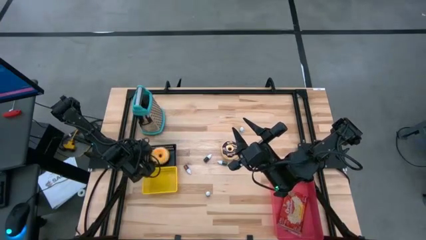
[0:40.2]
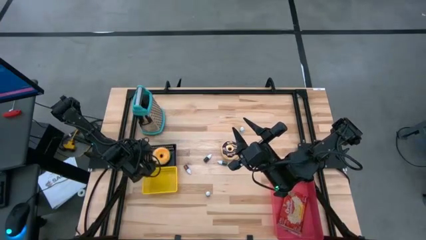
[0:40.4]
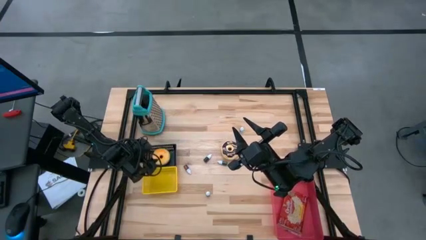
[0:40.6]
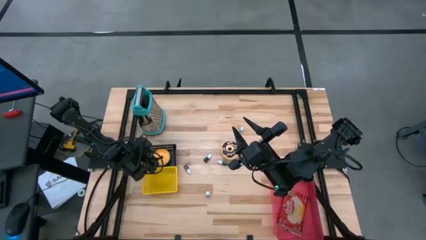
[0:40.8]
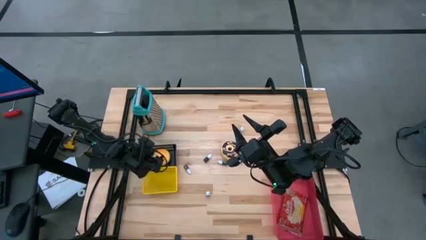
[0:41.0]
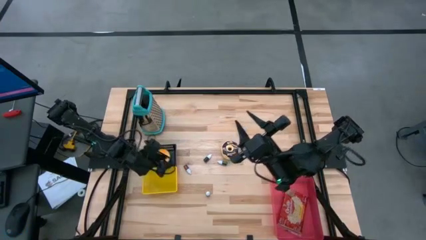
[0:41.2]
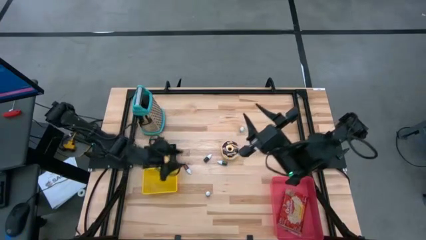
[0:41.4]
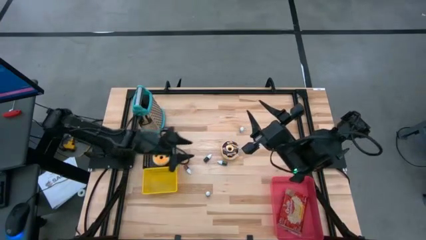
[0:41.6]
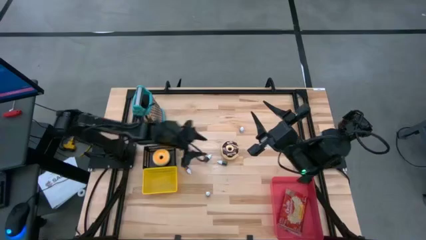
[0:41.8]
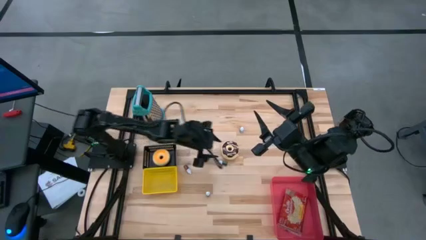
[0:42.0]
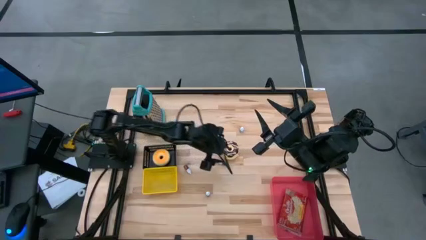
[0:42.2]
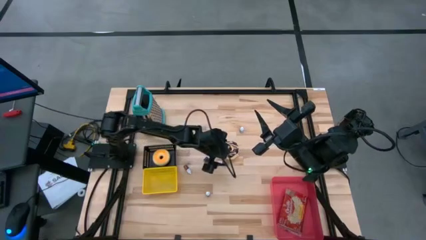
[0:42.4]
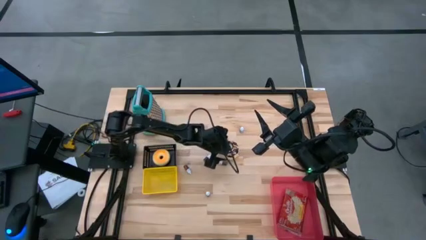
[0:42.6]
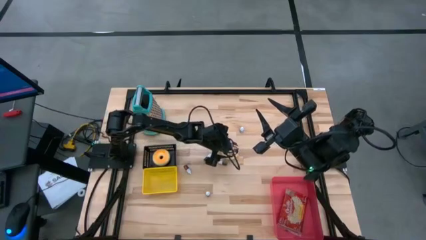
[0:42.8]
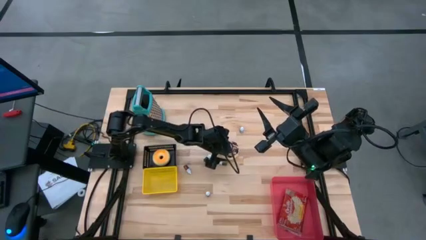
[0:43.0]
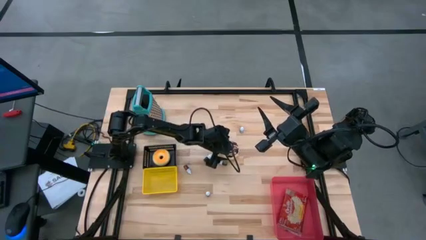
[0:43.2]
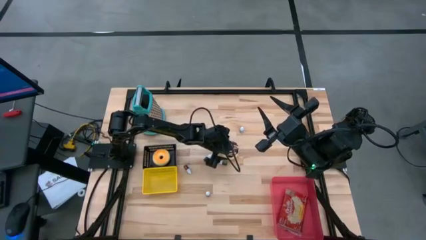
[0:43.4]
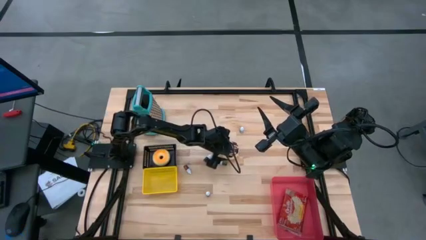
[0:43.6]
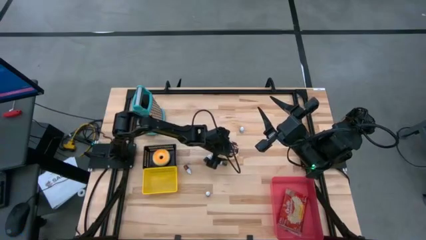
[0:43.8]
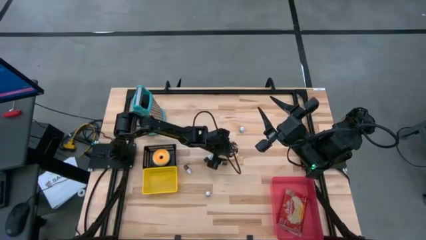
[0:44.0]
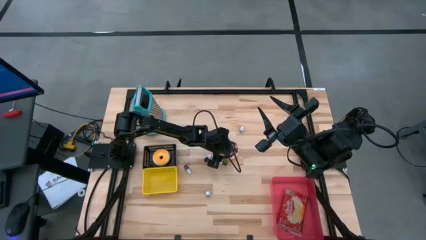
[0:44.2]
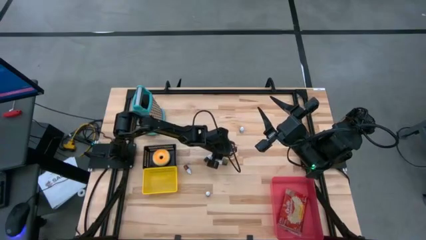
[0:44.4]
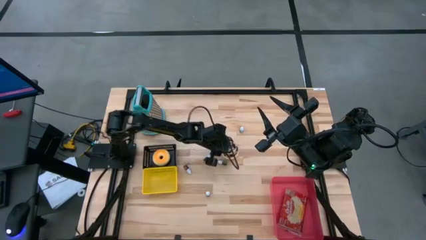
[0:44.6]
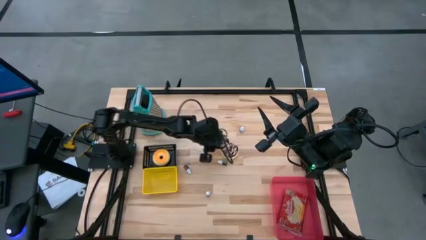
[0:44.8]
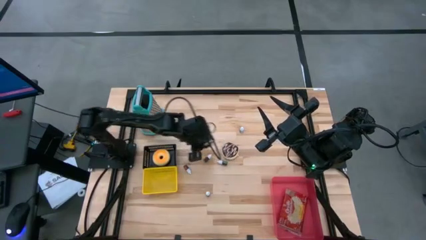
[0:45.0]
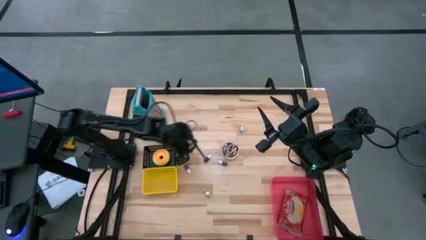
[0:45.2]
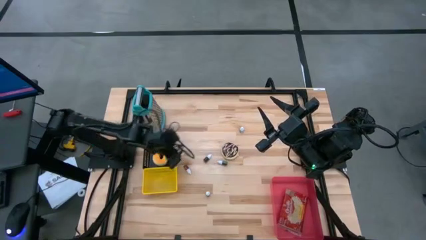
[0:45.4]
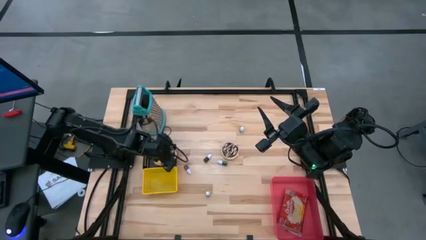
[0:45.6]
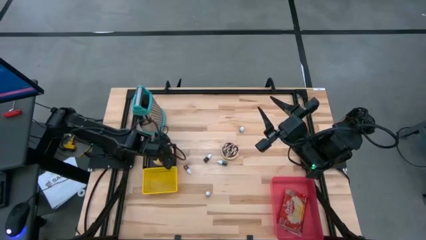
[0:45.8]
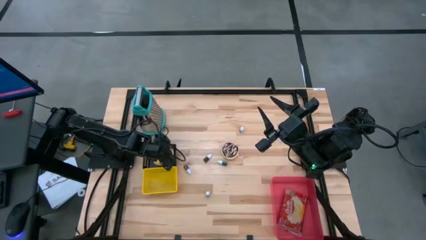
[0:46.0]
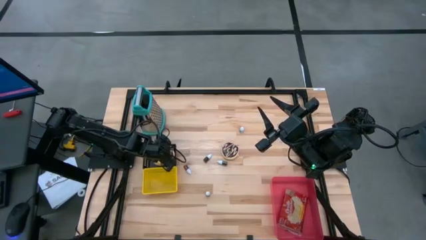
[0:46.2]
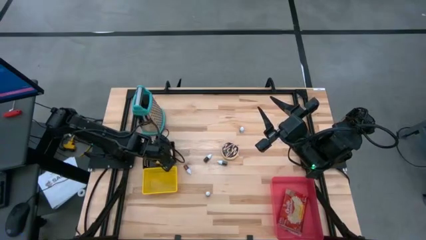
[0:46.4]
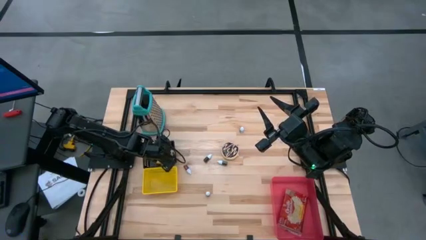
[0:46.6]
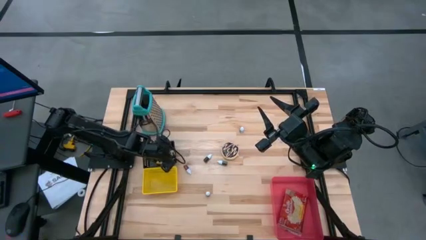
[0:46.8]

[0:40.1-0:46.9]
Put the black donut into the black bin

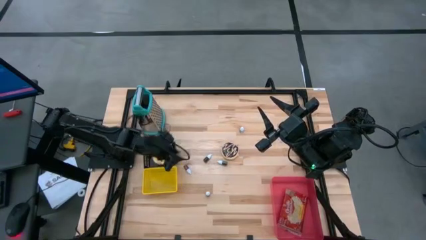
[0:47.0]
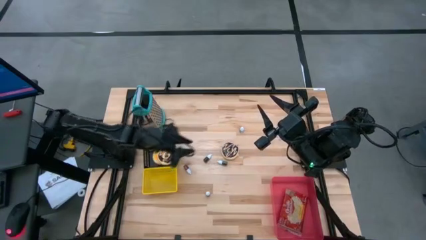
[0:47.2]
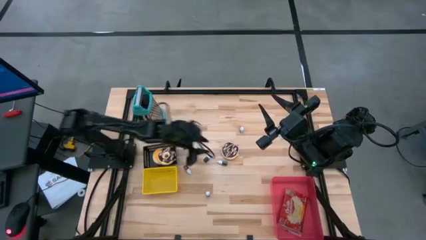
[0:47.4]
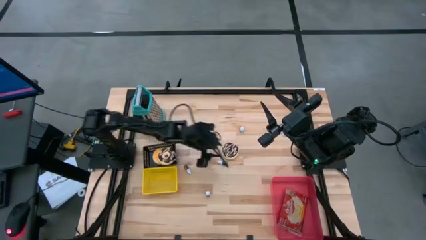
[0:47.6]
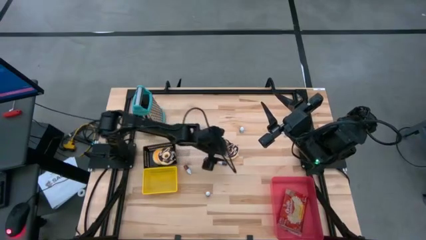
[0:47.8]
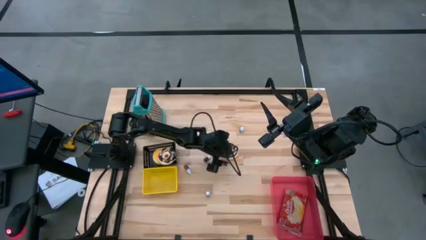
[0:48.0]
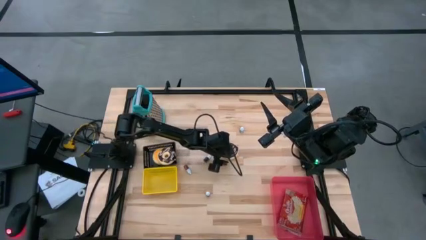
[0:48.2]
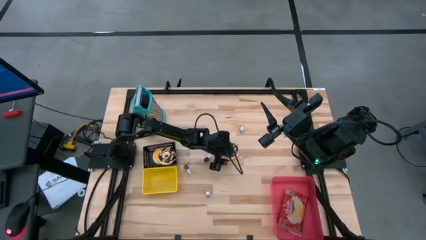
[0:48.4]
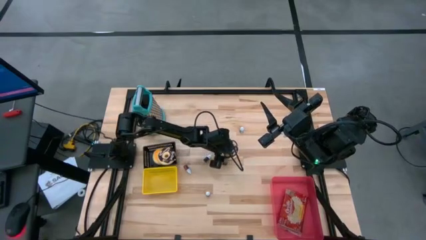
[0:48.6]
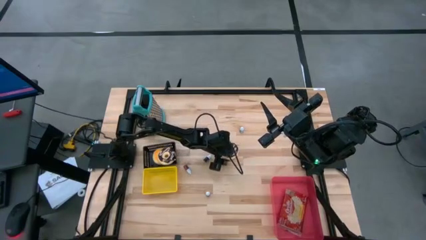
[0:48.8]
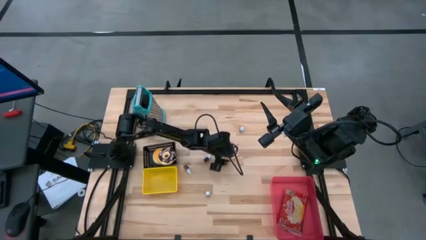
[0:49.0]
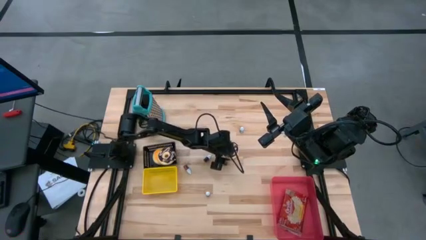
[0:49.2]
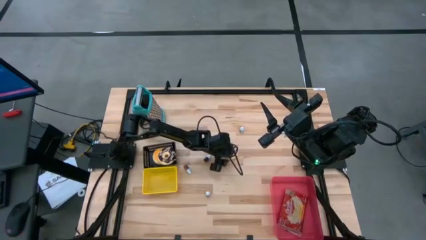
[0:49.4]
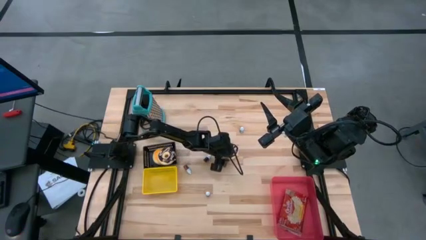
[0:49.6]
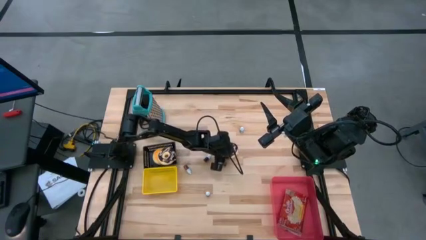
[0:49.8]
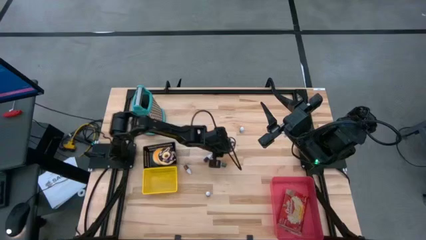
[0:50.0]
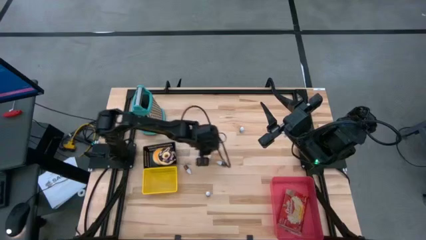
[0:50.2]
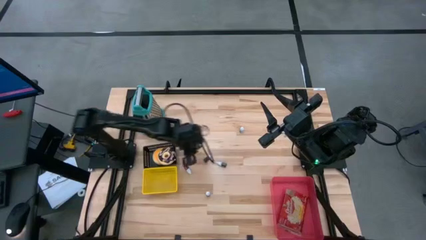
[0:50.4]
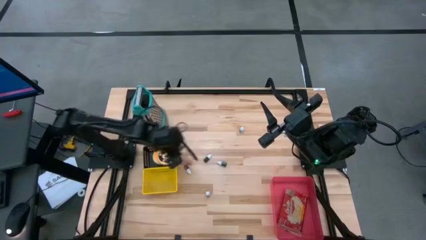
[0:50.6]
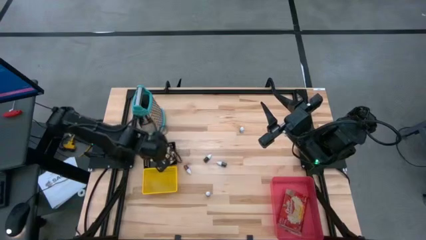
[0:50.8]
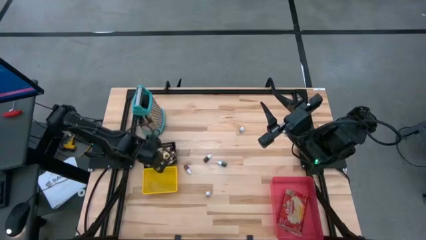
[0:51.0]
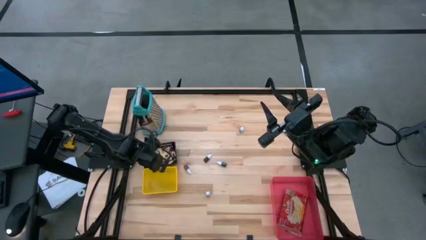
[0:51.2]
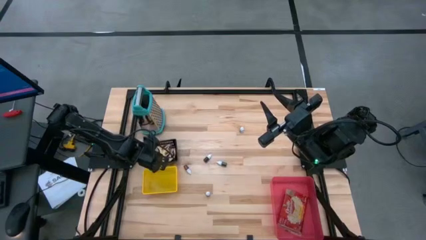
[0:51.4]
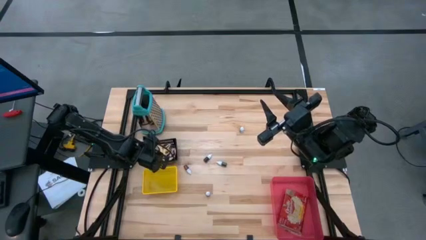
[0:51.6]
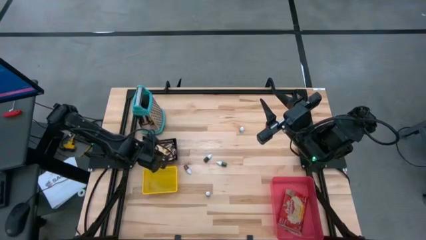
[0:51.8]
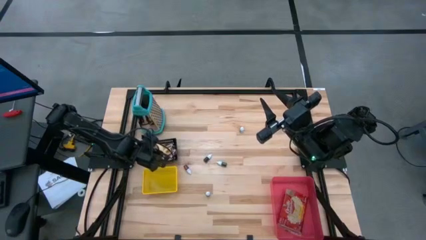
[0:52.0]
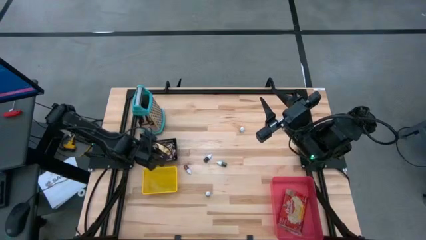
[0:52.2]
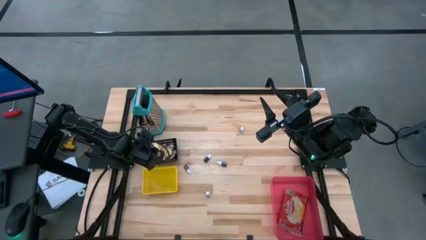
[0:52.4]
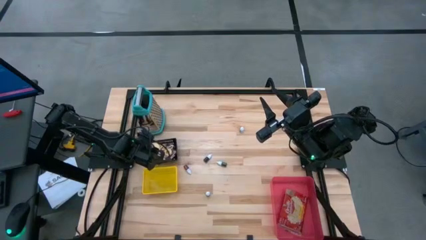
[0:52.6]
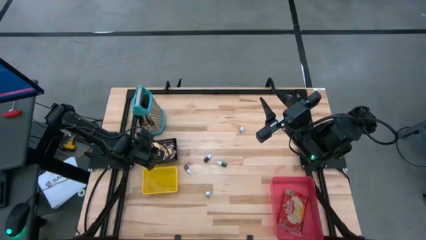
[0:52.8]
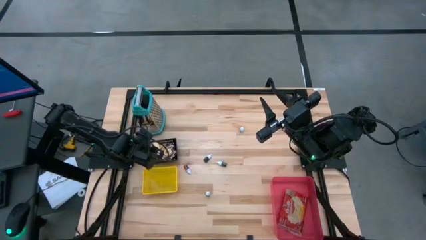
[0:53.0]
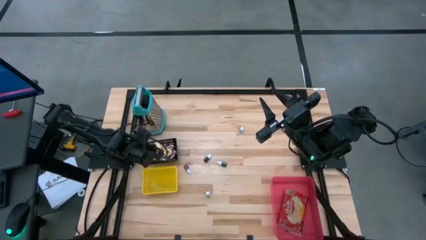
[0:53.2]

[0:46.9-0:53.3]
Put the black donut into the black bin

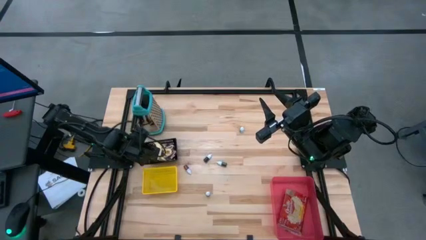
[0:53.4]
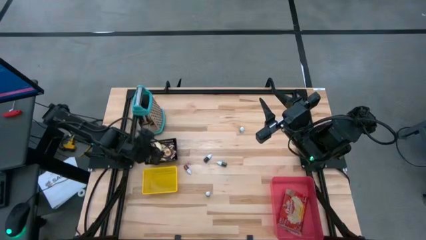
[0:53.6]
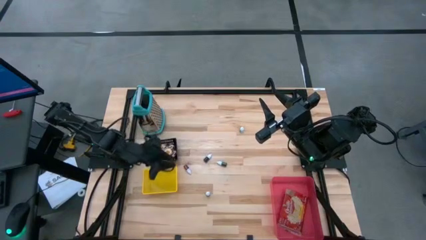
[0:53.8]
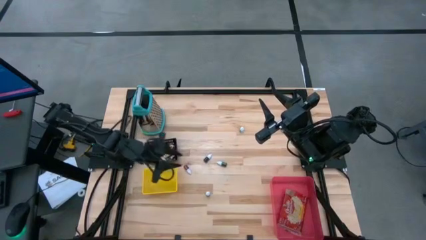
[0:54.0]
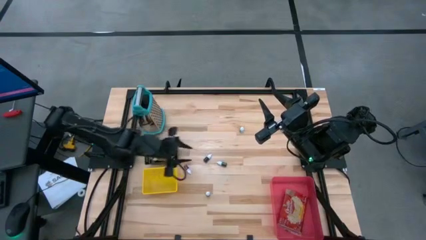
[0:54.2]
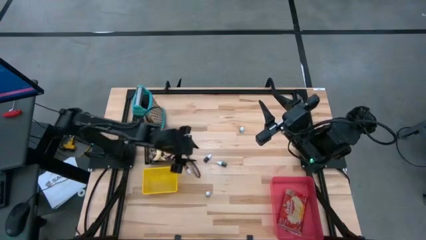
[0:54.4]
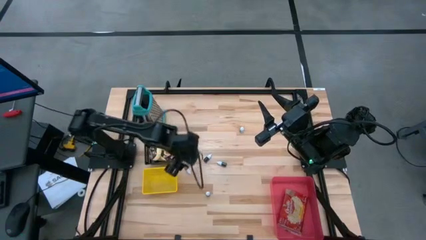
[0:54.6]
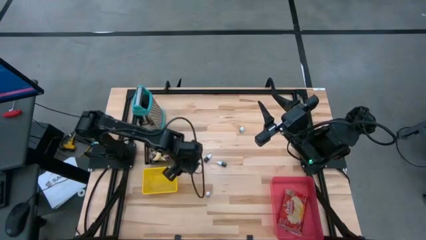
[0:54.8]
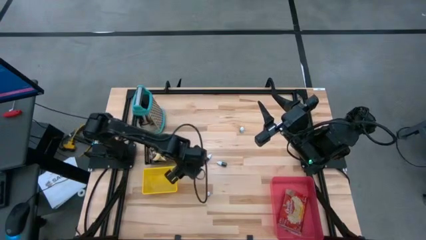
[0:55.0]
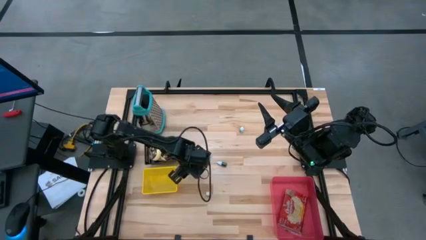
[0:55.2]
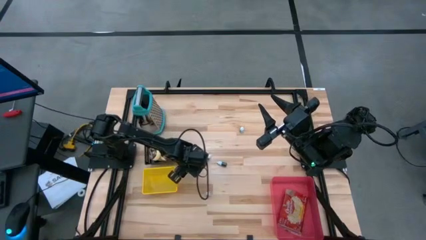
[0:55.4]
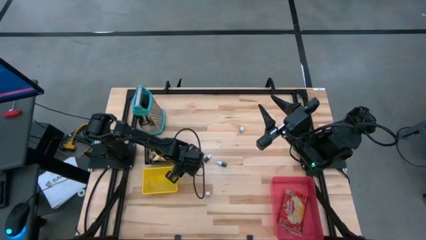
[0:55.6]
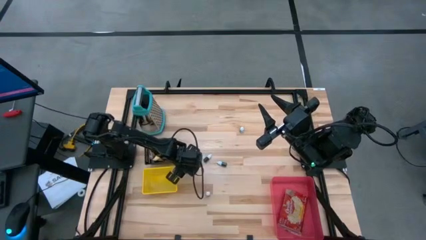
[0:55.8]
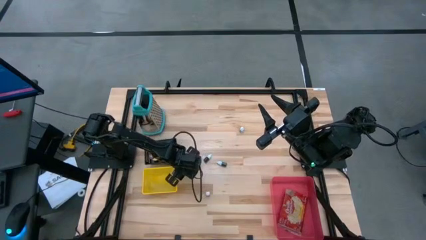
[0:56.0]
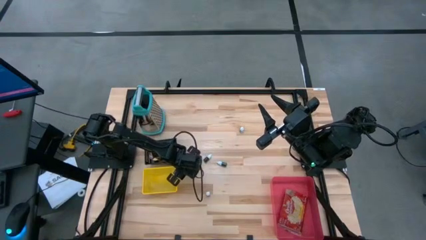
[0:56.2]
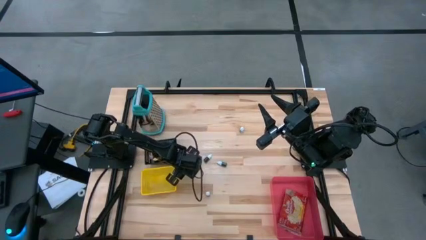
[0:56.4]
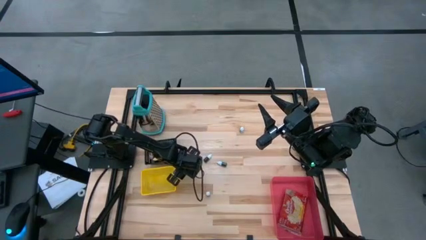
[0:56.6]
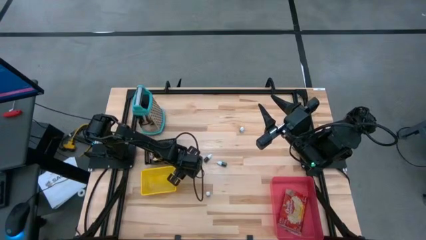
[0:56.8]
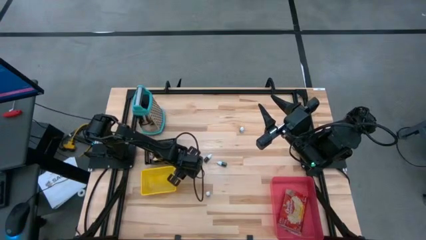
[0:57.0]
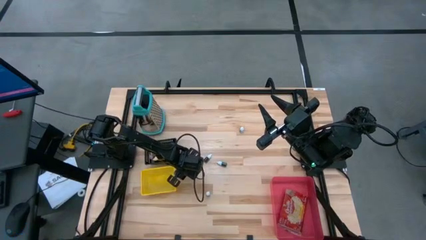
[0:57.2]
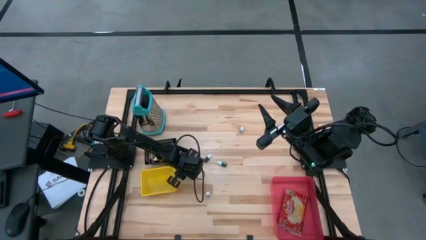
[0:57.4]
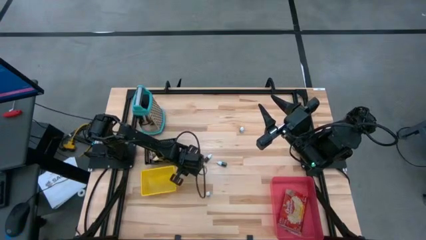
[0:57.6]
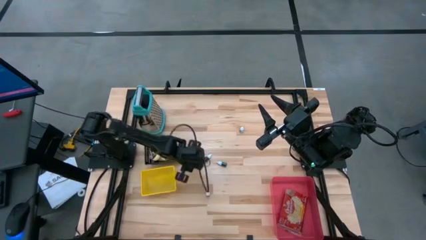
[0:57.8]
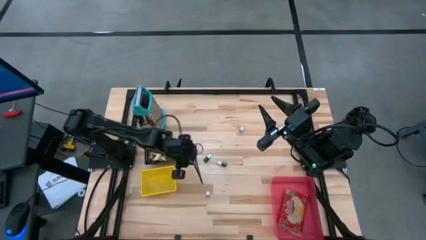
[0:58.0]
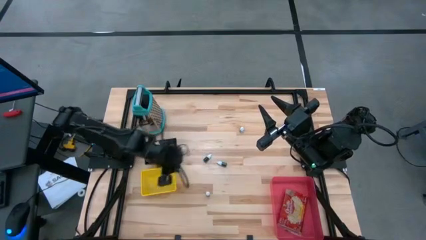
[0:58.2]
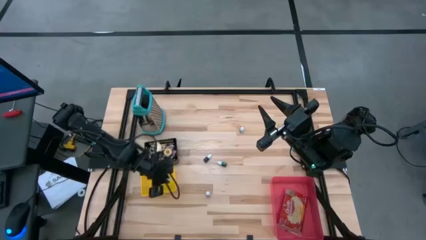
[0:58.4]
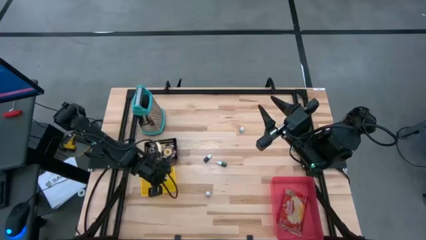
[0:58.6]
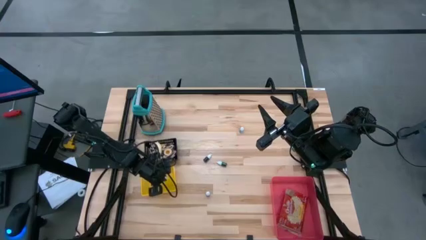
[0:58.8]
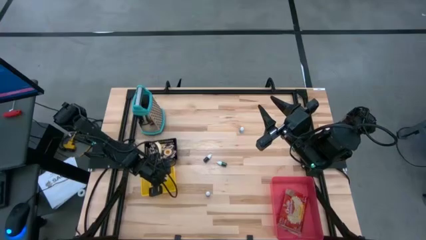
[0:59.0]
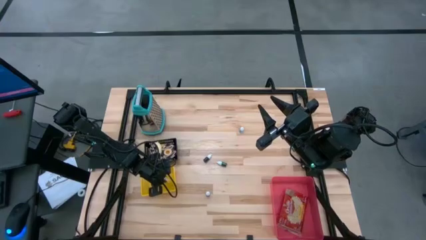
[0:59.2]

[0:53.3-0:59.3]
Put the top red food coloring bottle into the yellow bin
